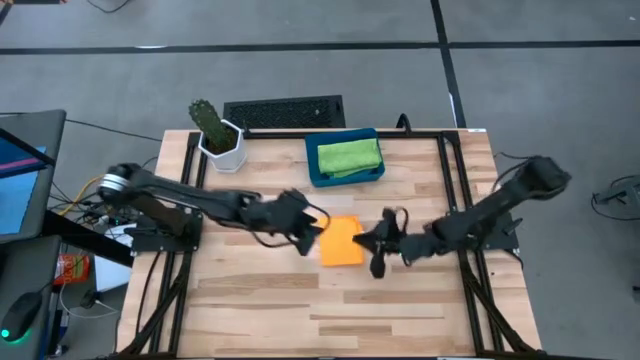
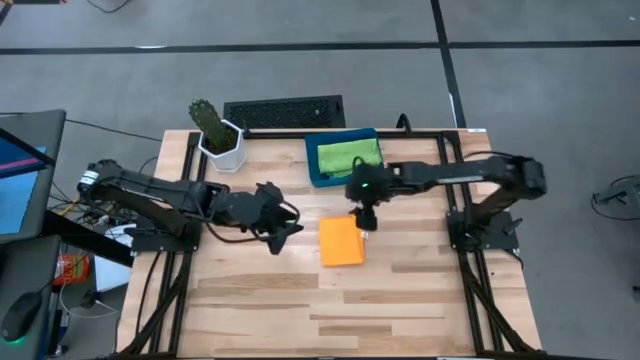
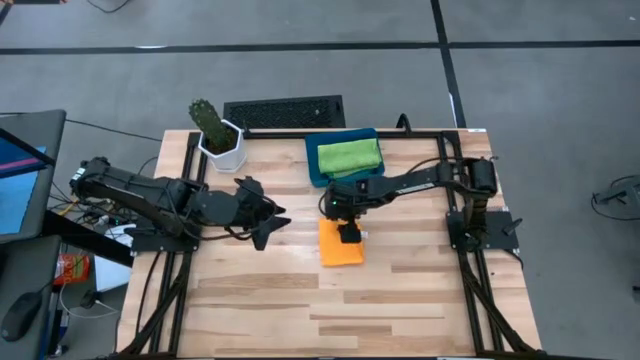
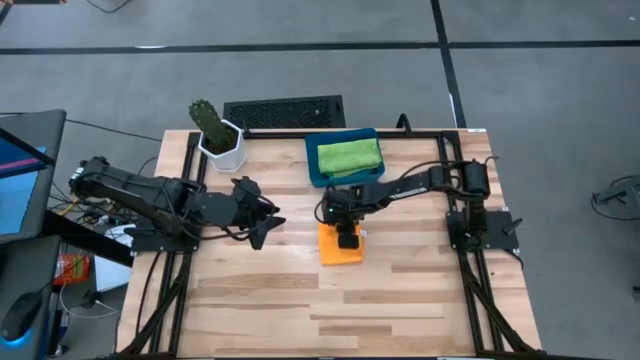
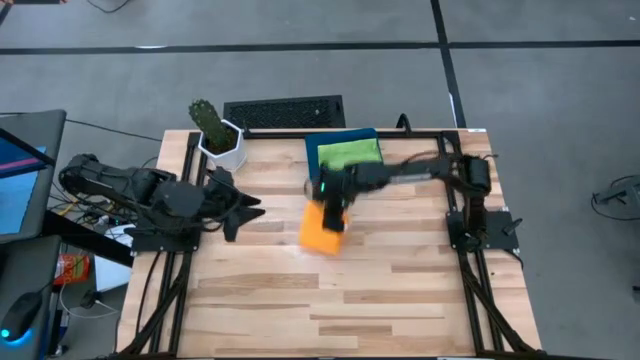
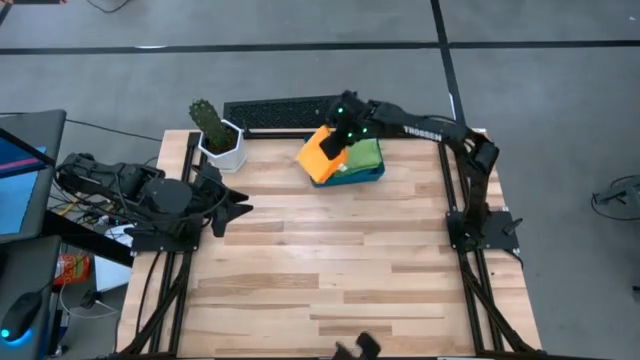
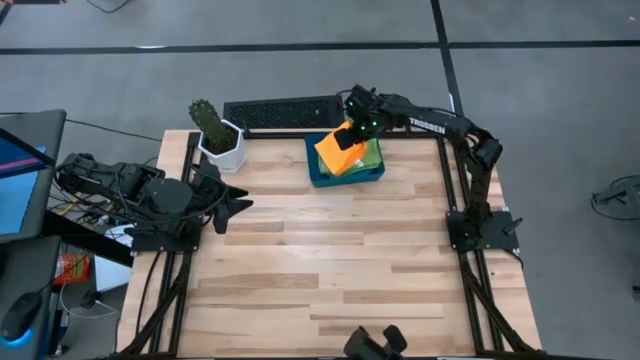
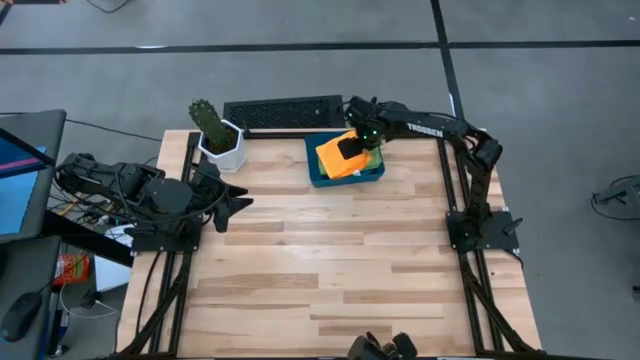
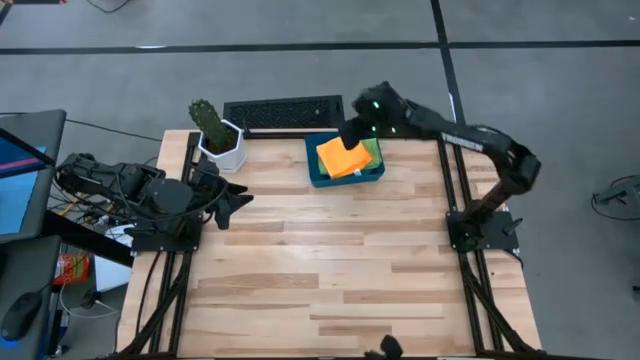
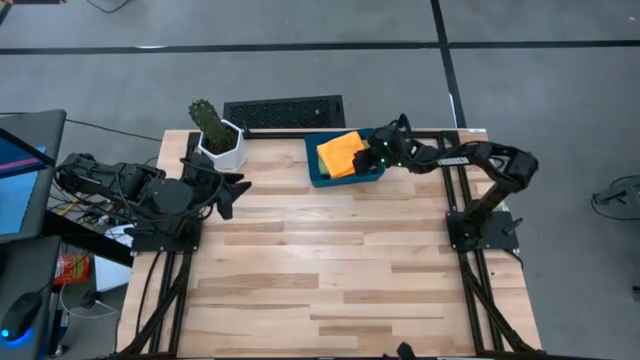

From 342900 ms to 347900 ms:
Task: Fold microfiber towels
Put the folded orange microfiber cloth into the blue bin

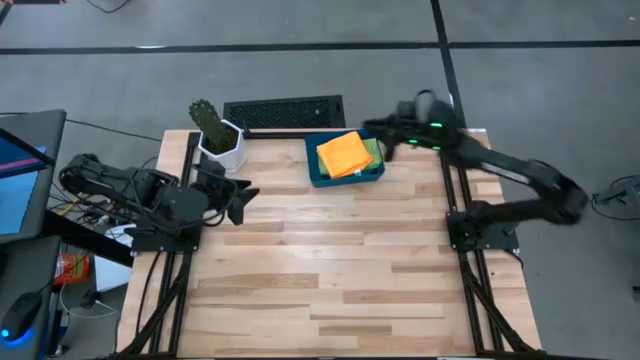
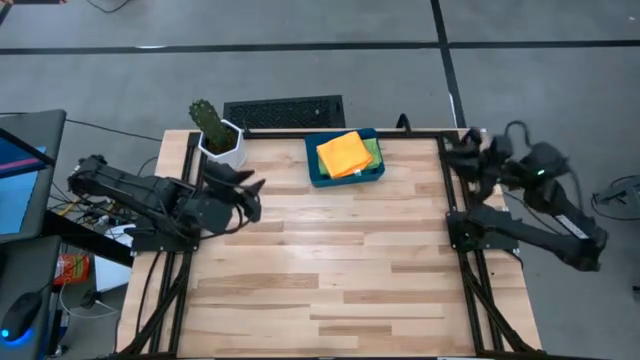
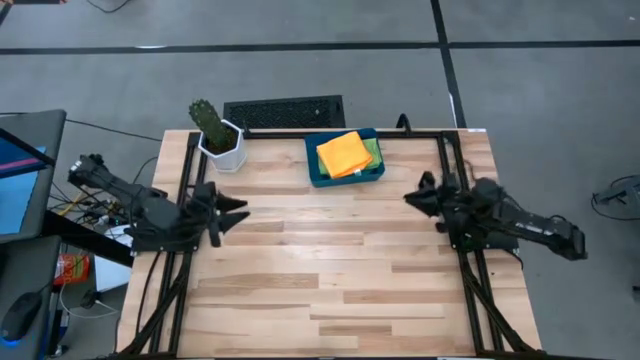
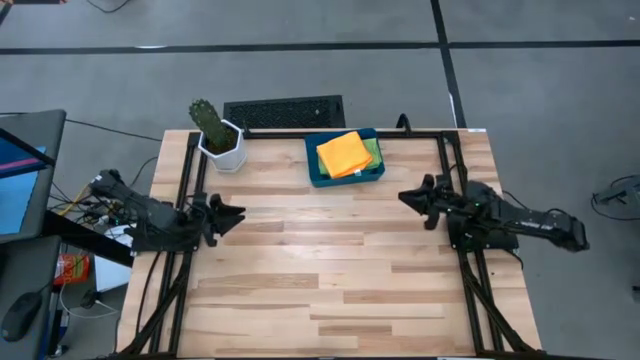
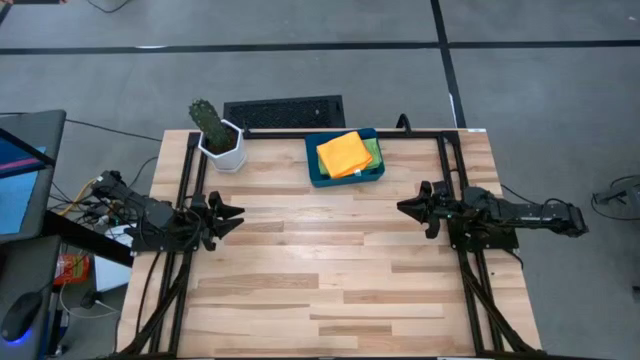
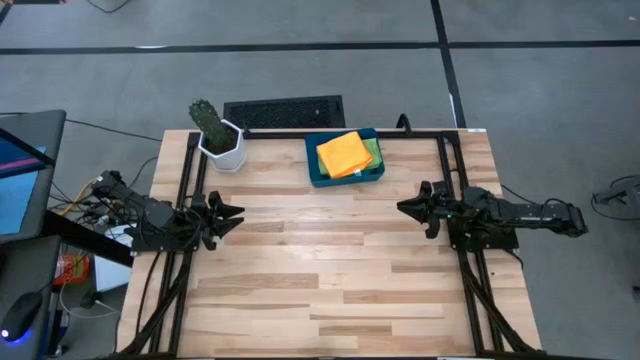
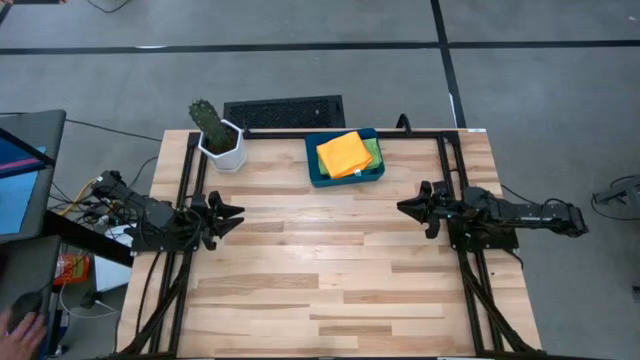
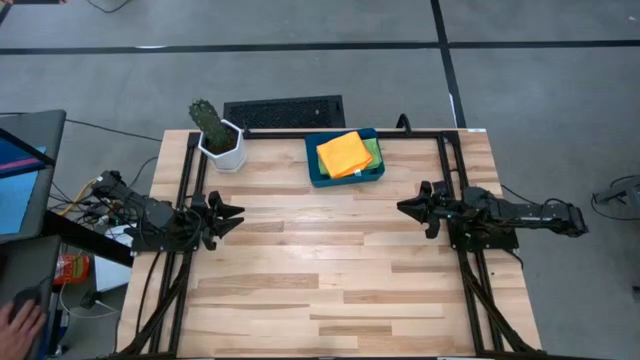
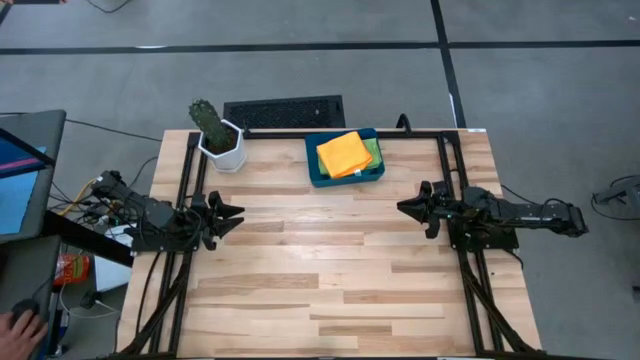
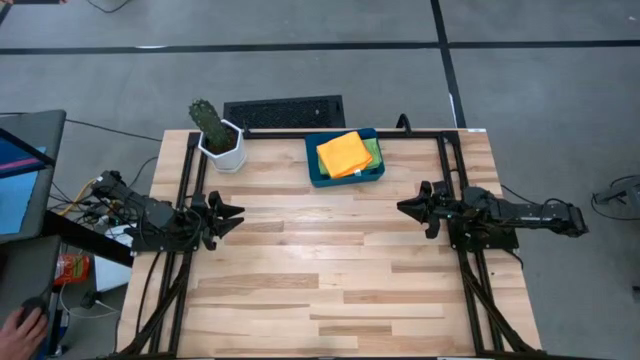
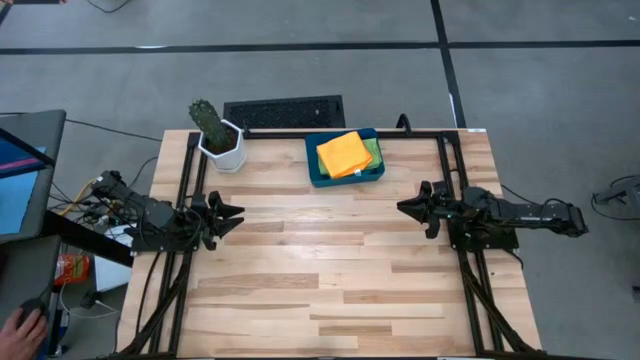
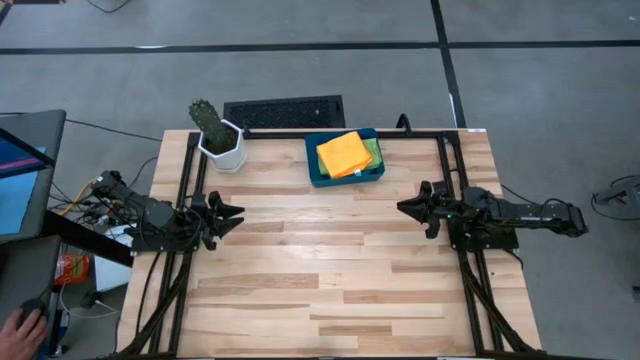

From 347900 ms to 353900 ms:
Return to Home Position

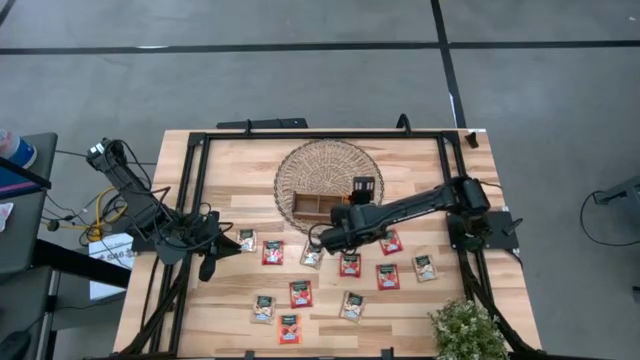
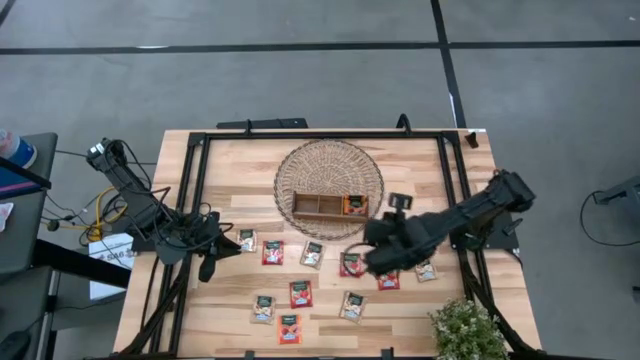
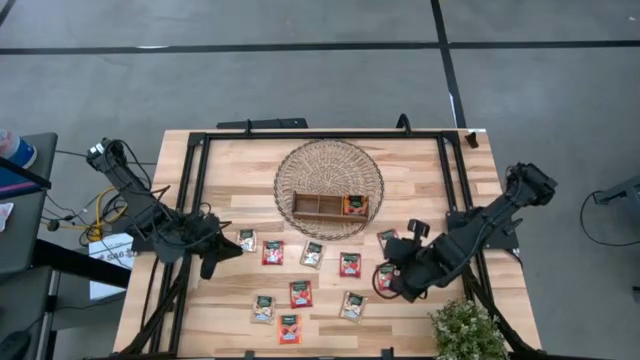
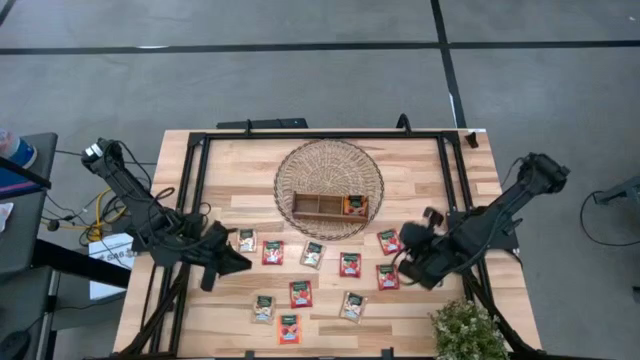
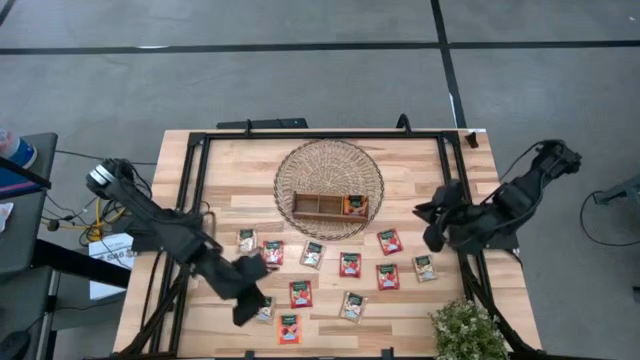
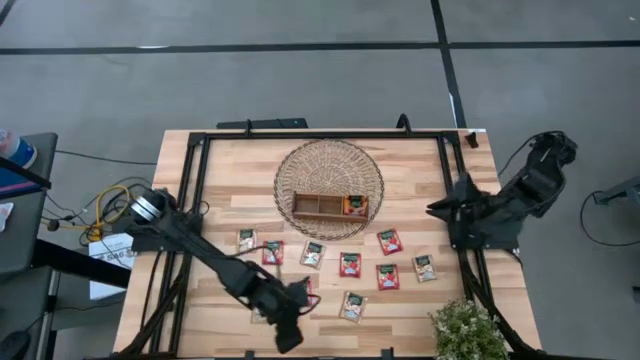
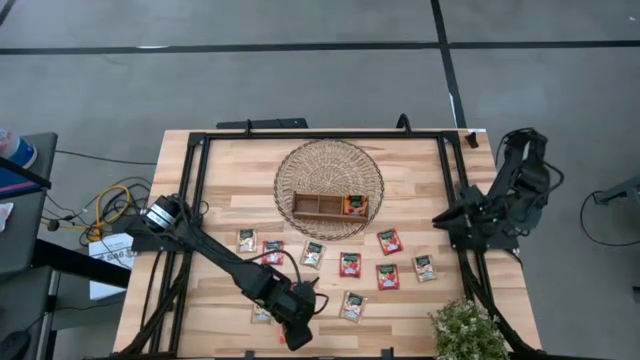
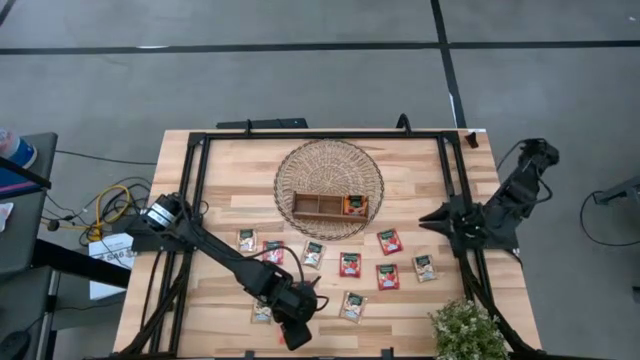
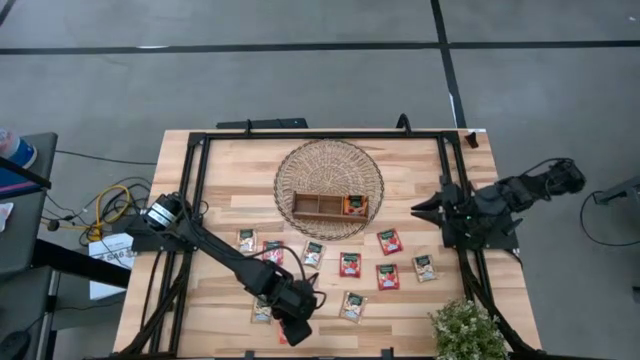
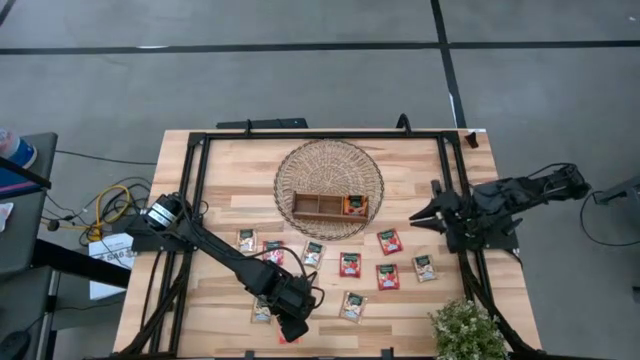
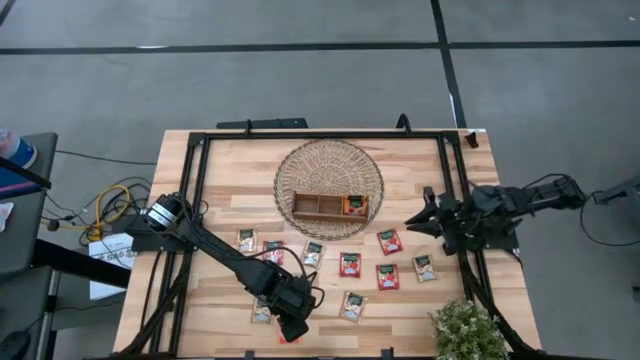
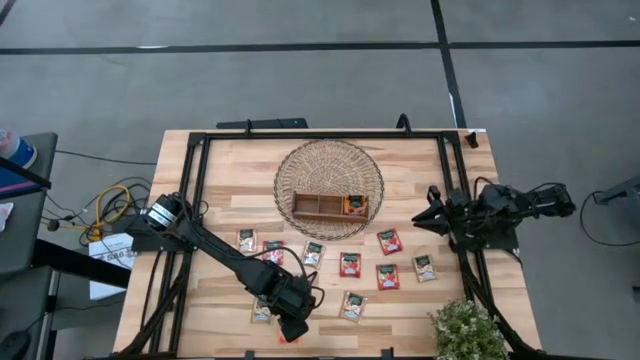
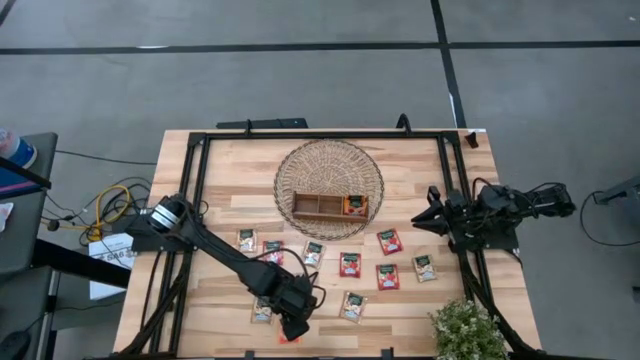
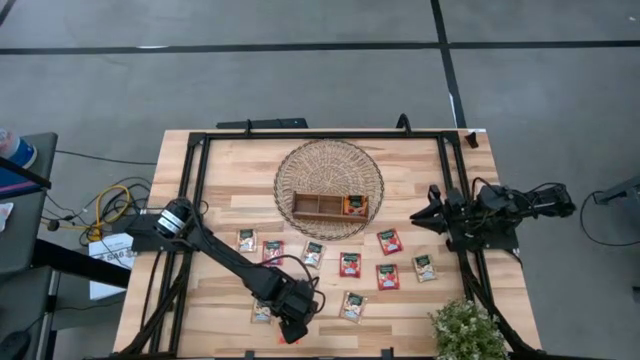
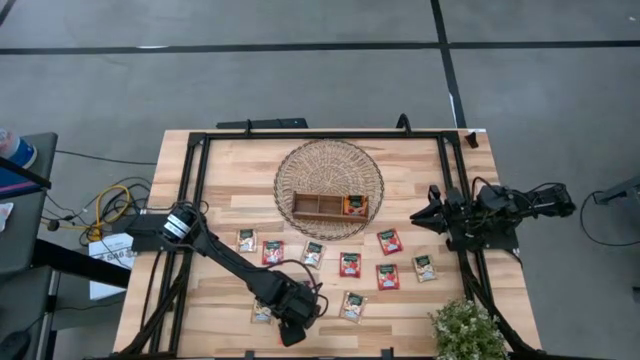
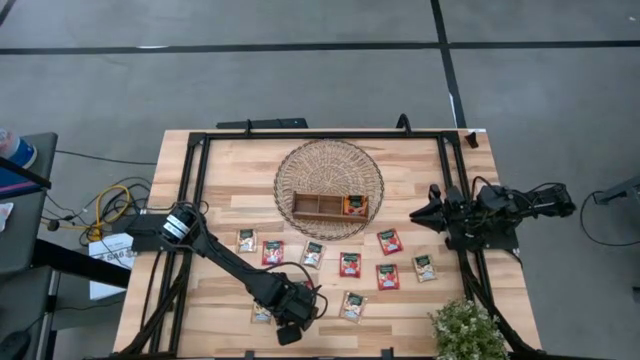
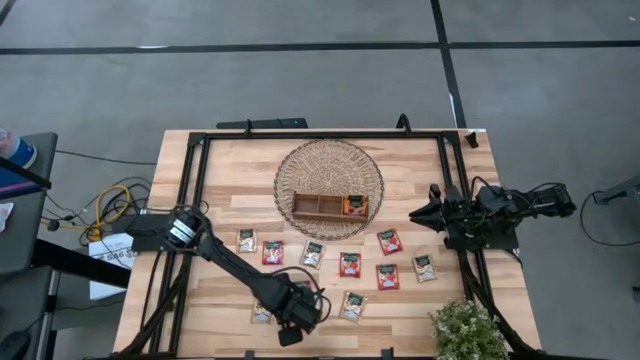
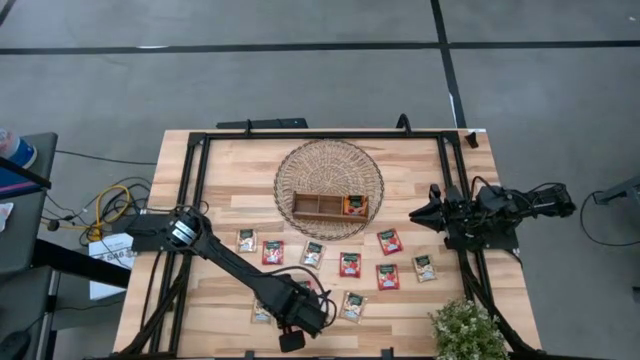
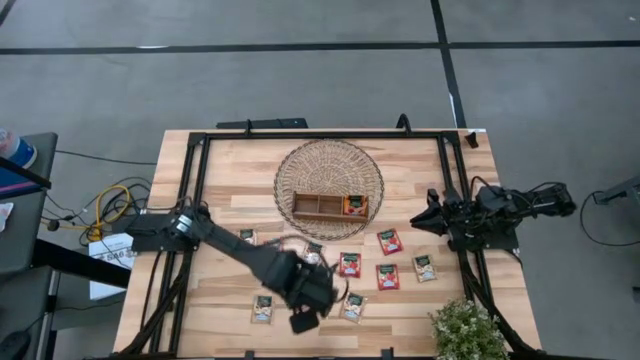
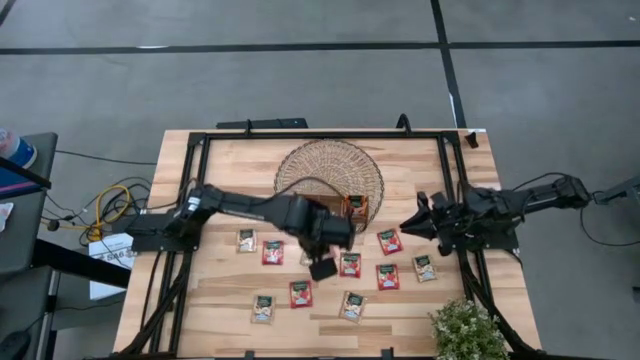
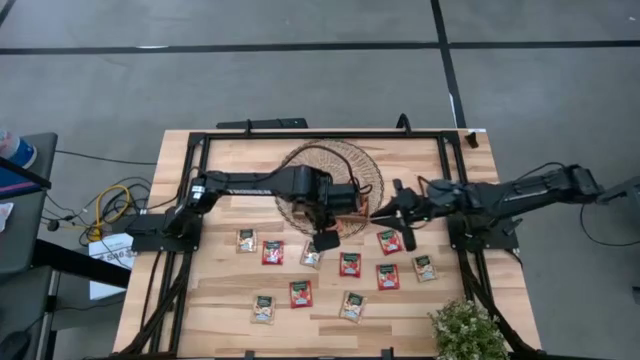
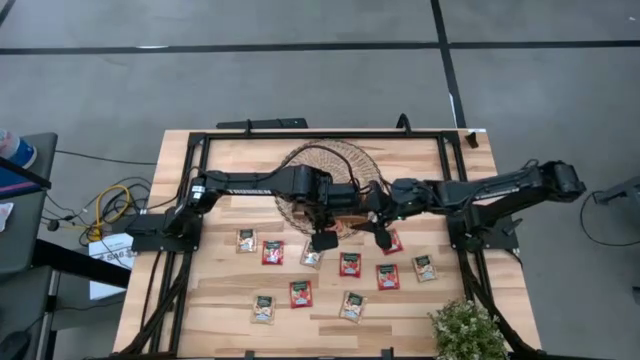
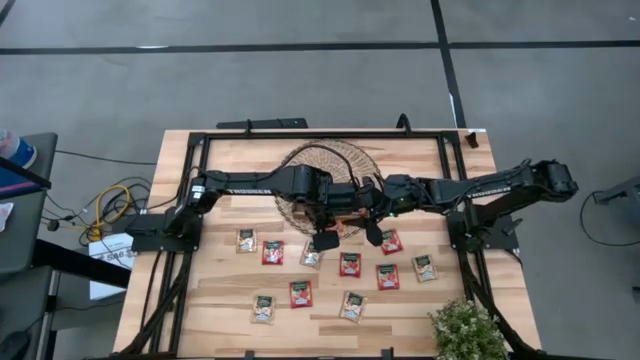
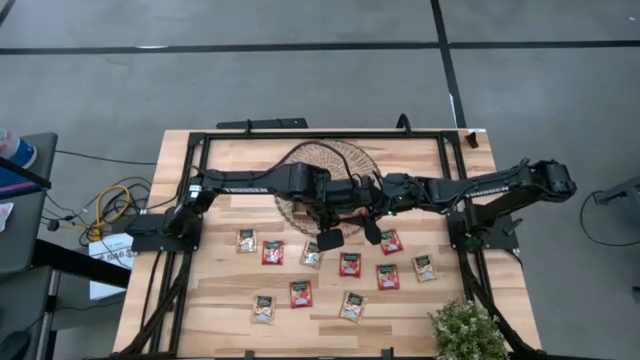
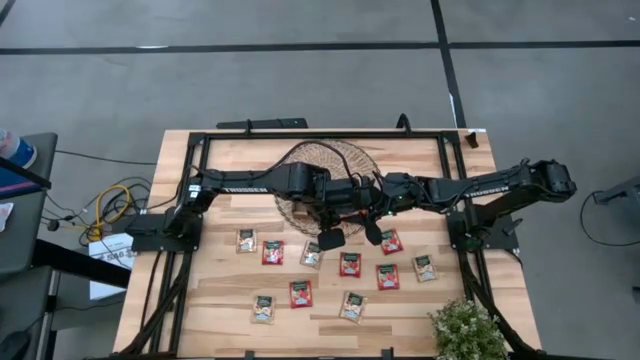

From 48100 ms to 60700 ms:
Task: Pick & Place Tea
Put the orange tea bag into the right section of the wooden organizer
